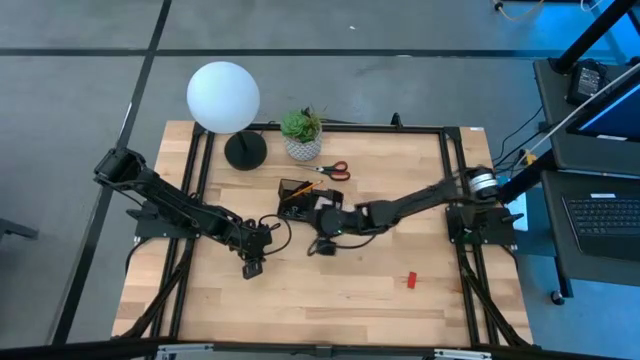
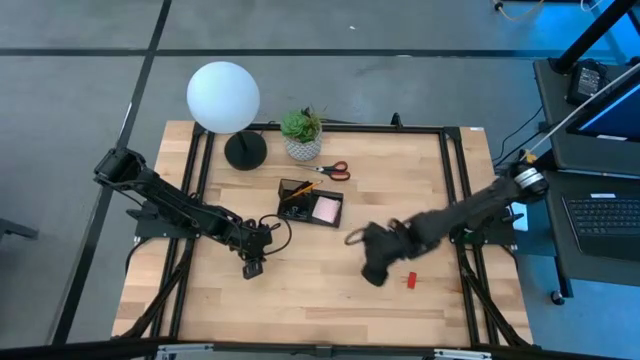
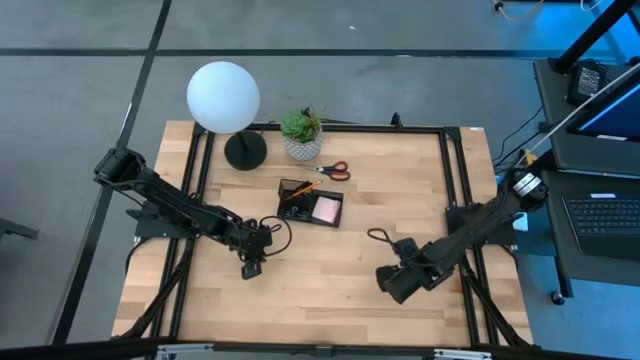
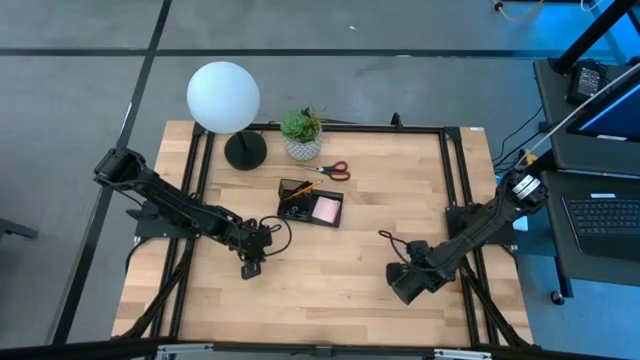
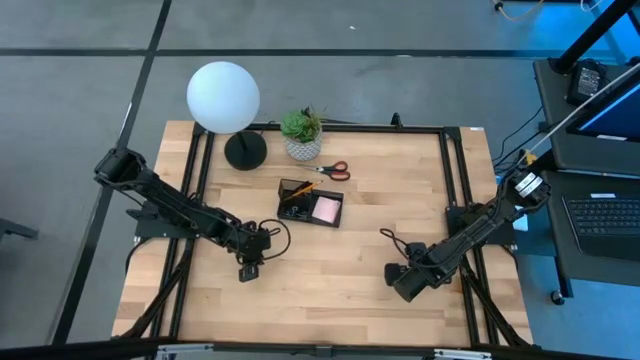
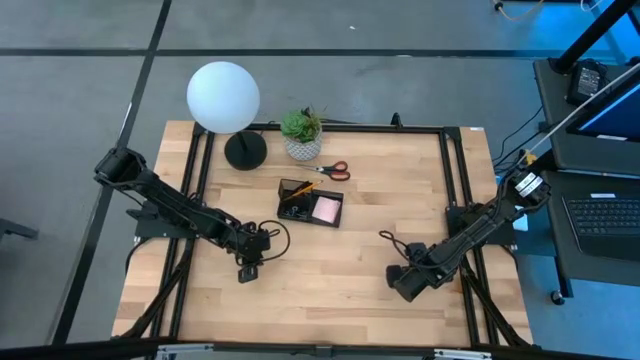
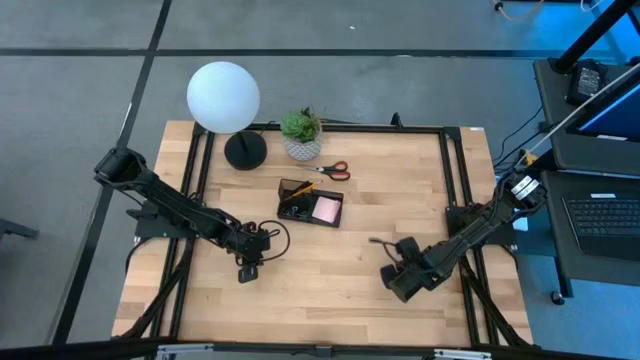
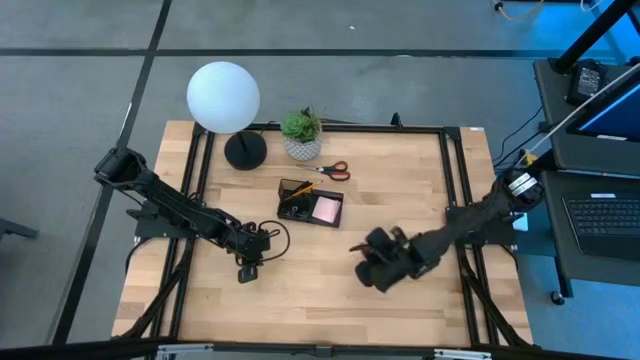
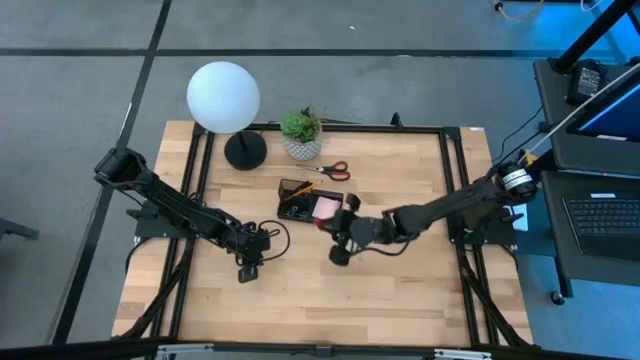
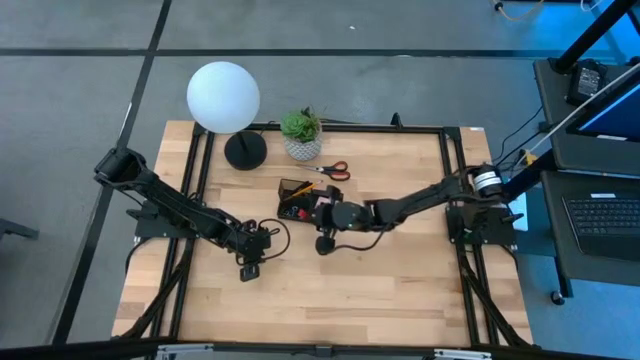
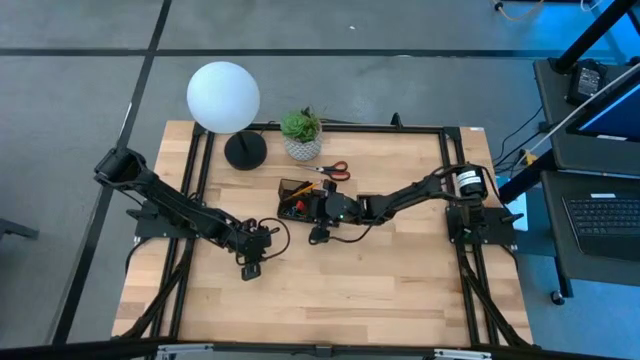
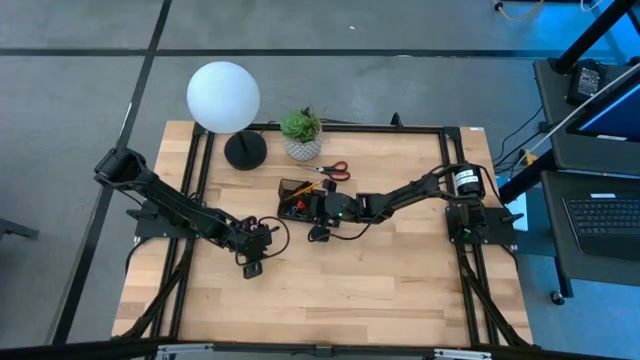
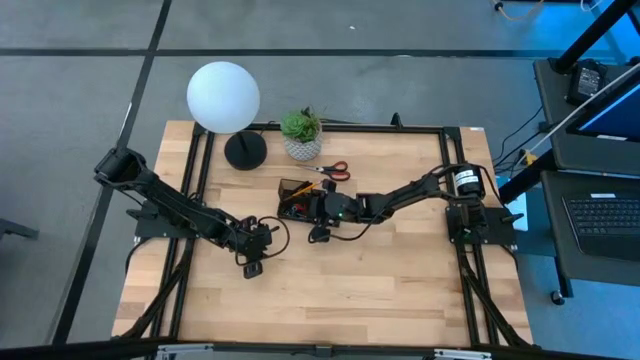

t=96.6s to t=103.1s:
Task: Pick and place office supplies into organizer
Put the red eraser into the black desk organizer

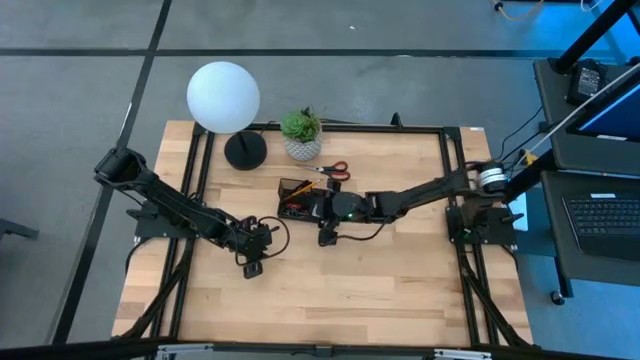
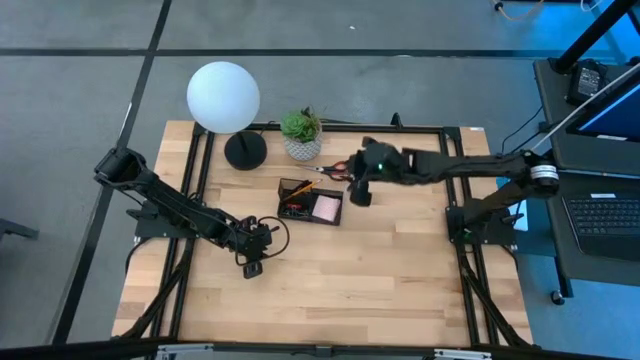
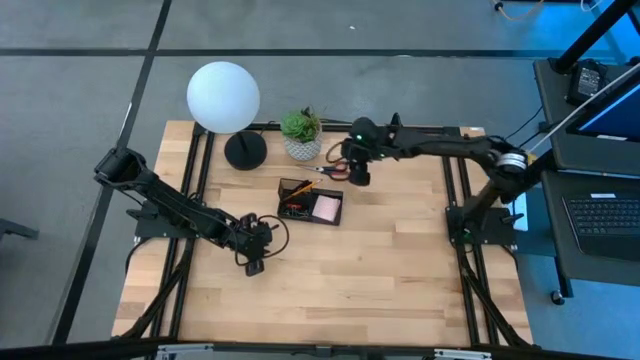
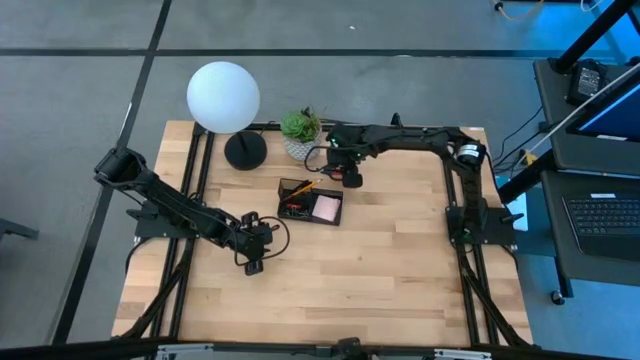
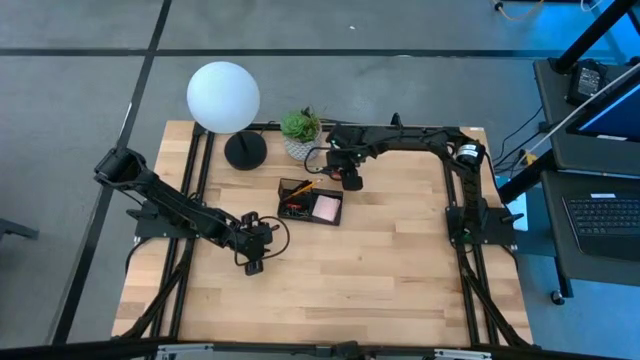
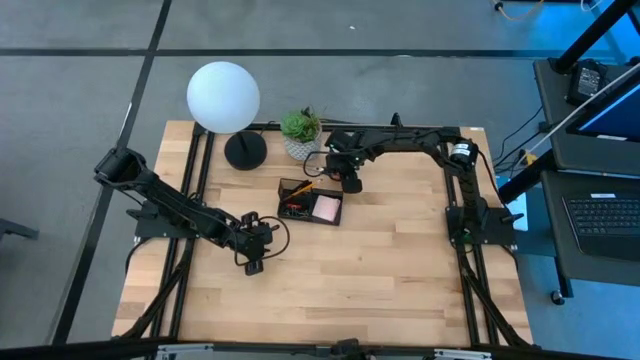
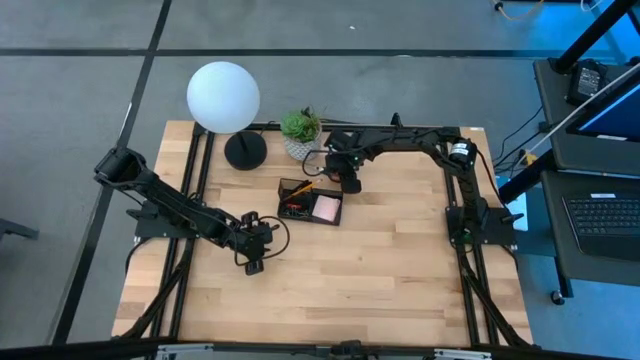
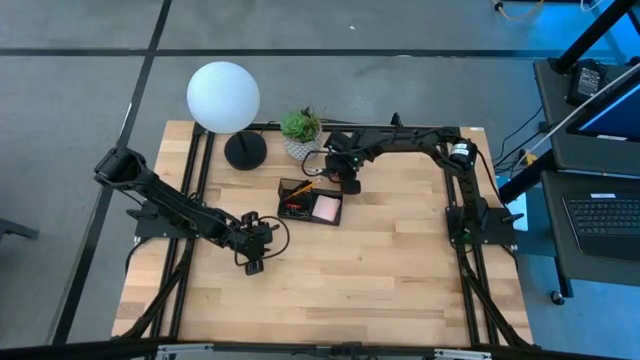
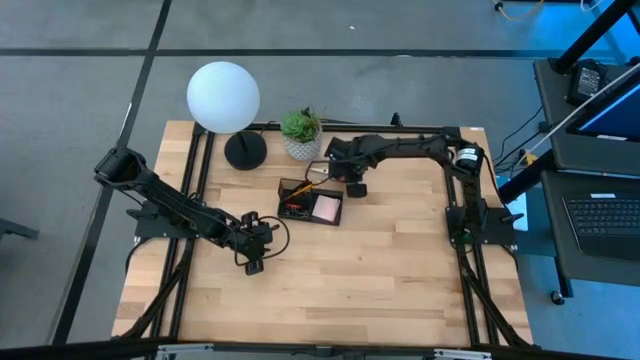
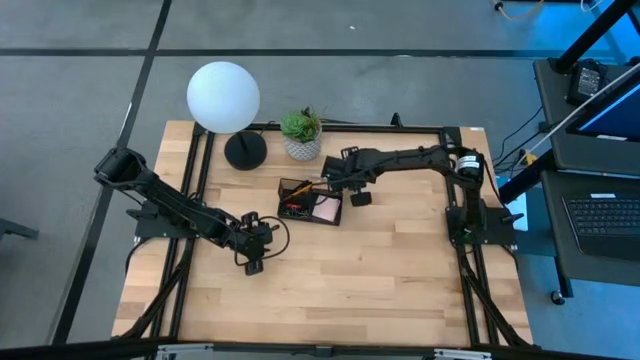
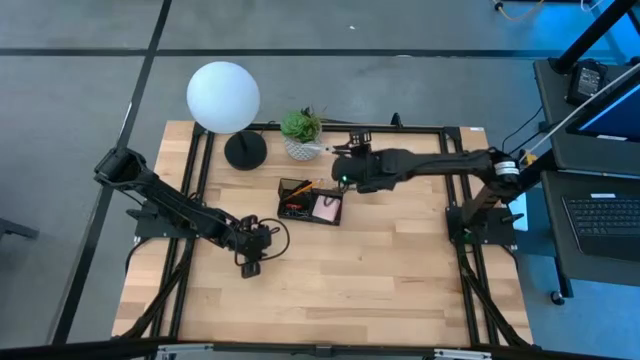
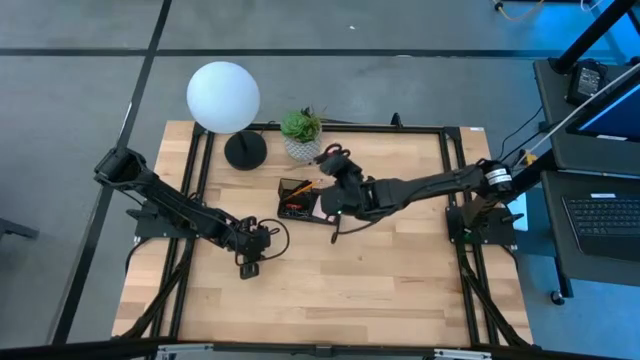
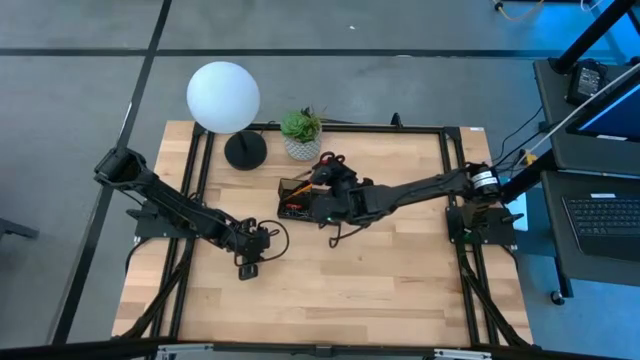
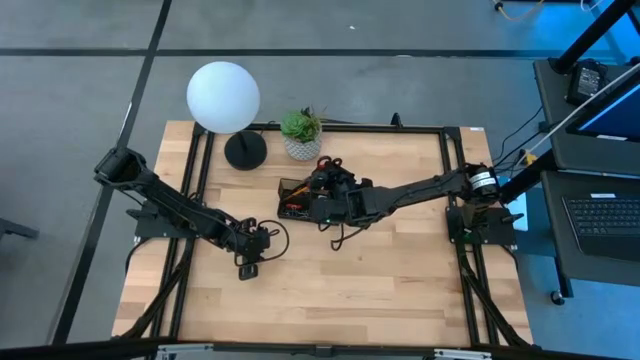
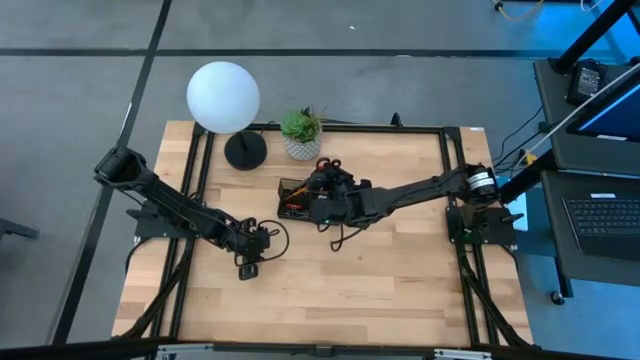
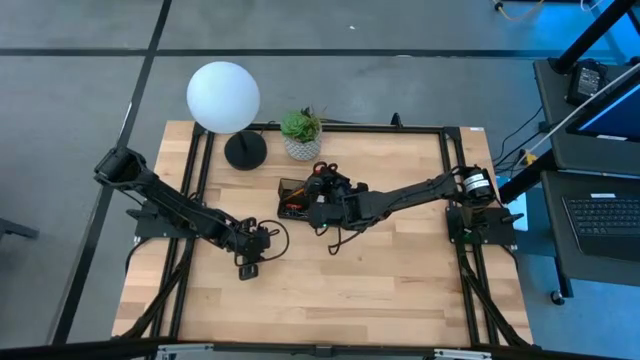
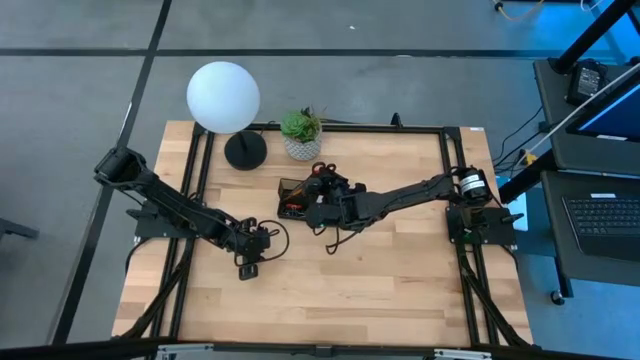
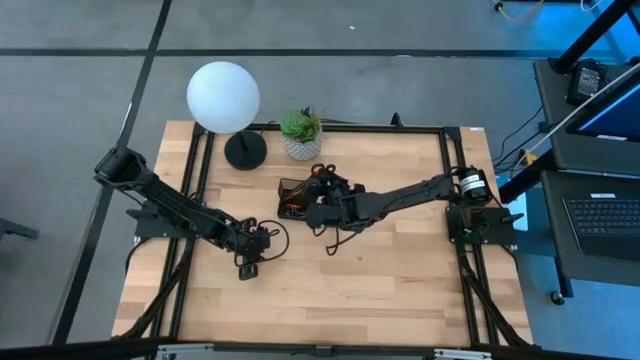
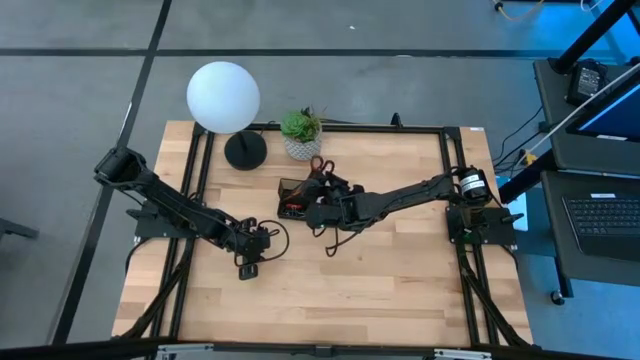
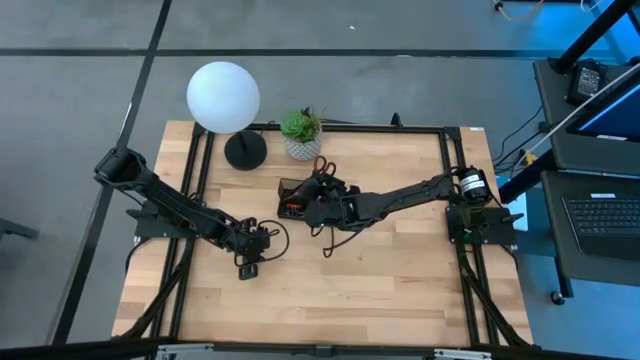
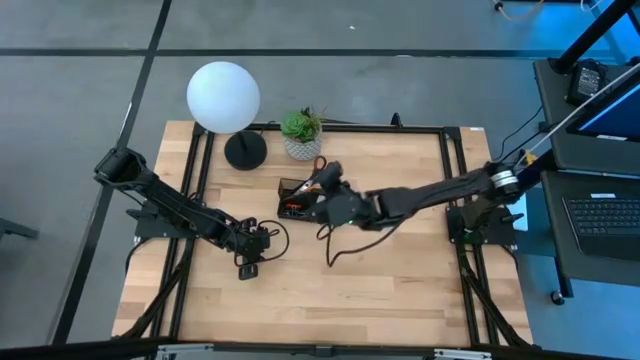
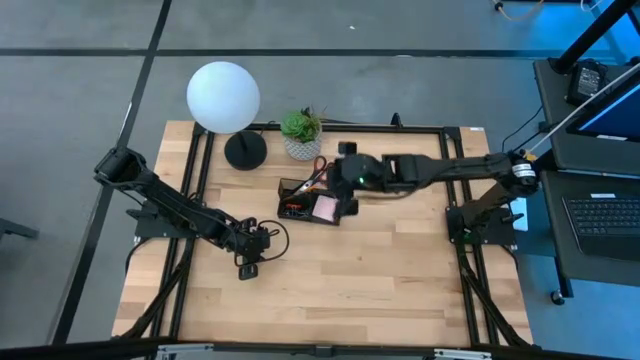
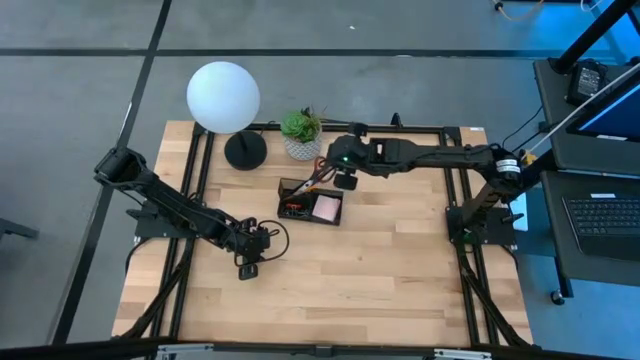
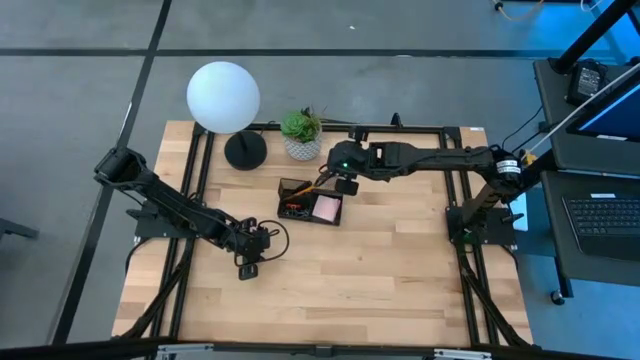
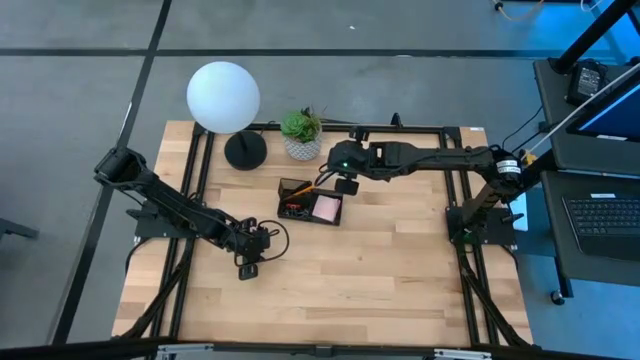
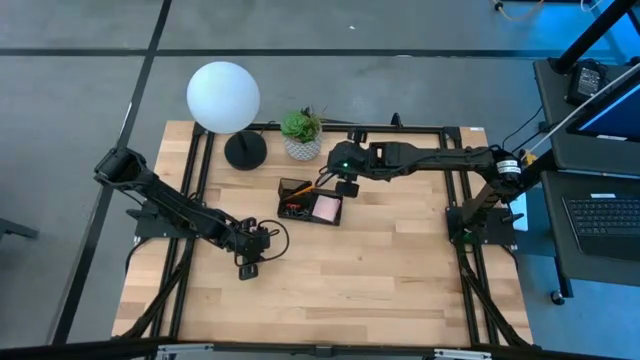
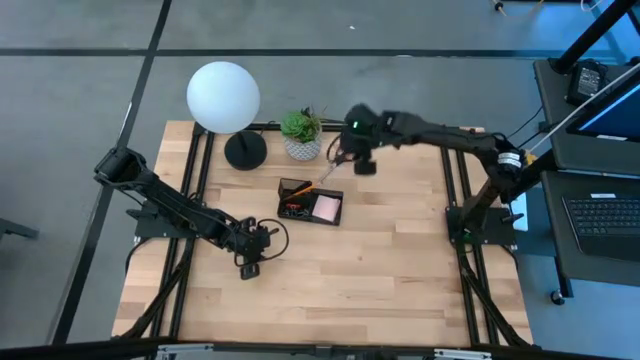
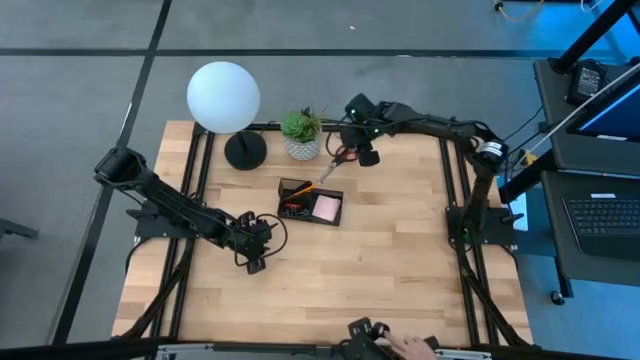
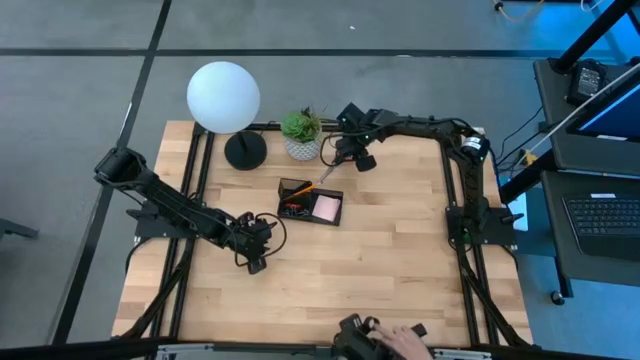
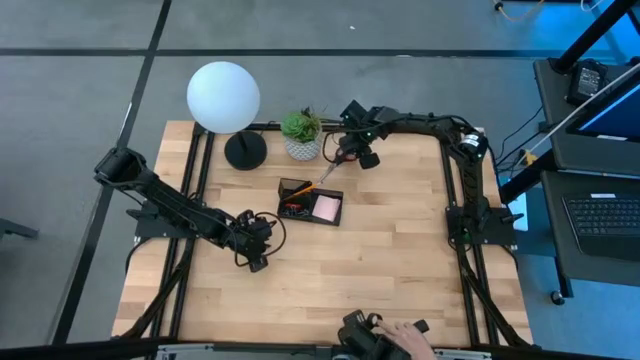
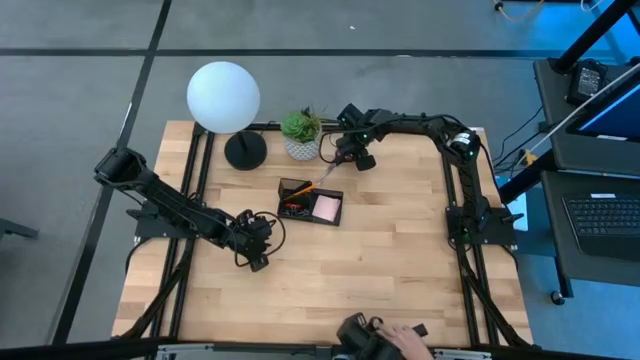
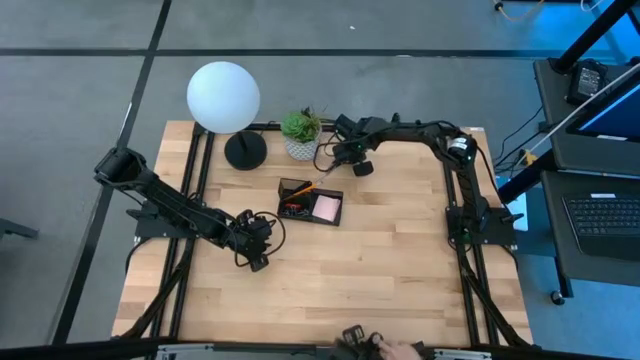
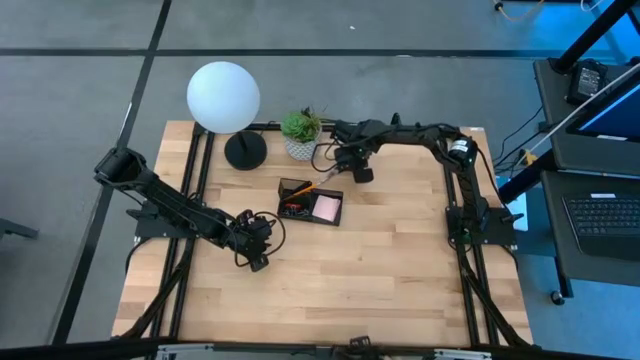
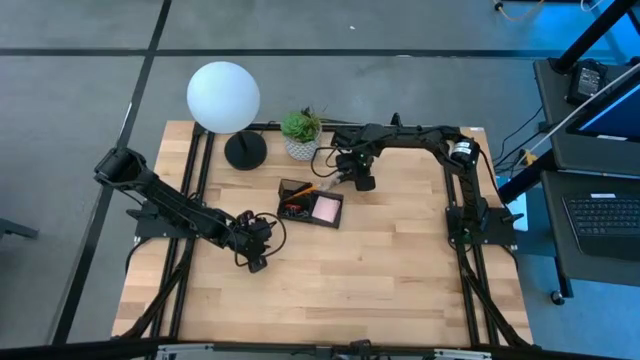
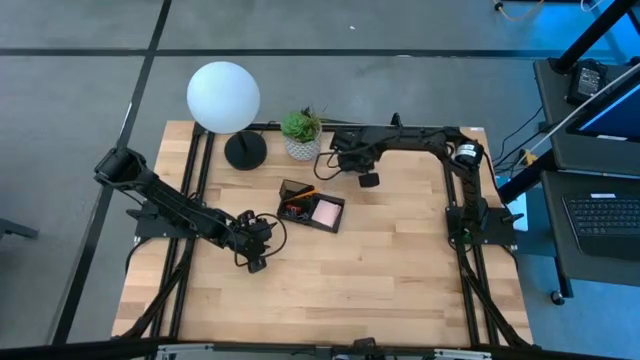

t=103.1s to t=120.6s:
Put the black scissors into the black desk organizer
